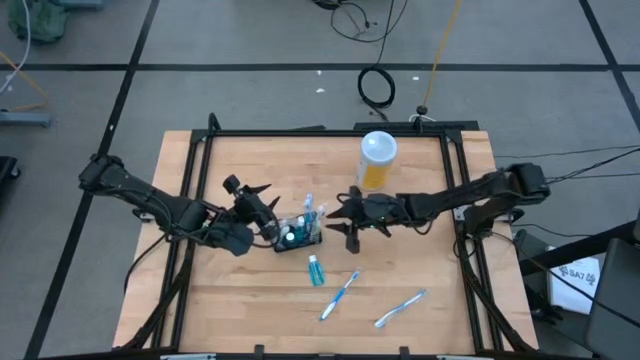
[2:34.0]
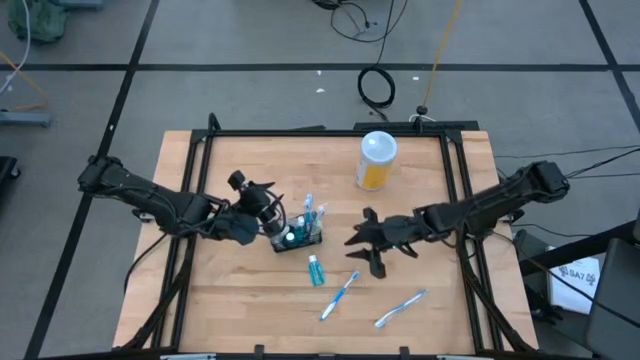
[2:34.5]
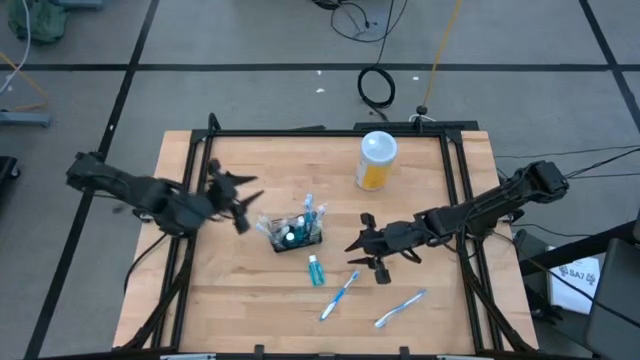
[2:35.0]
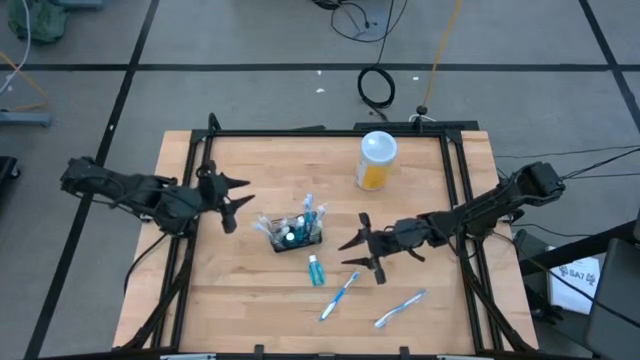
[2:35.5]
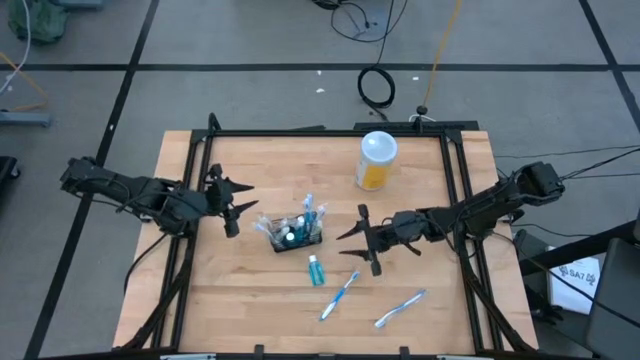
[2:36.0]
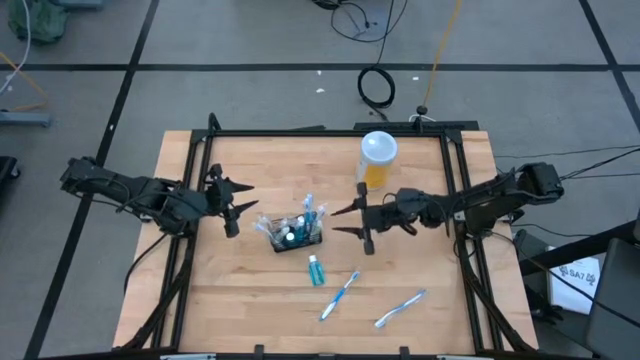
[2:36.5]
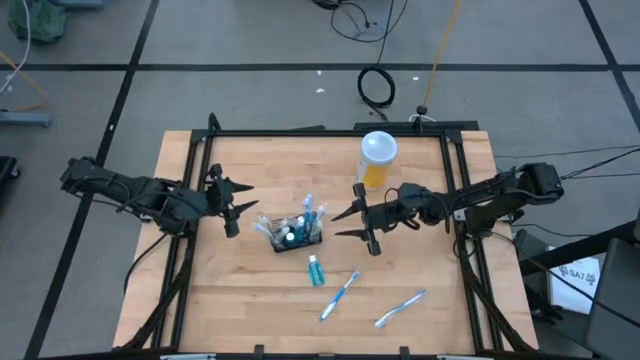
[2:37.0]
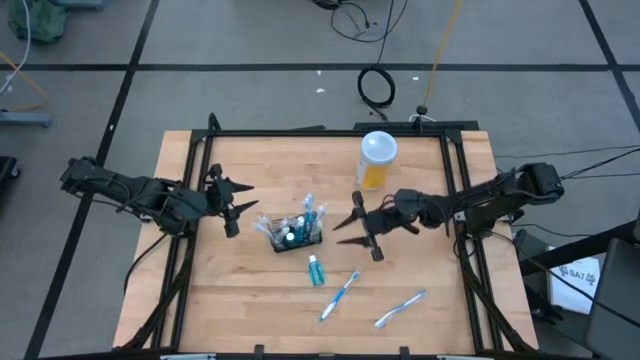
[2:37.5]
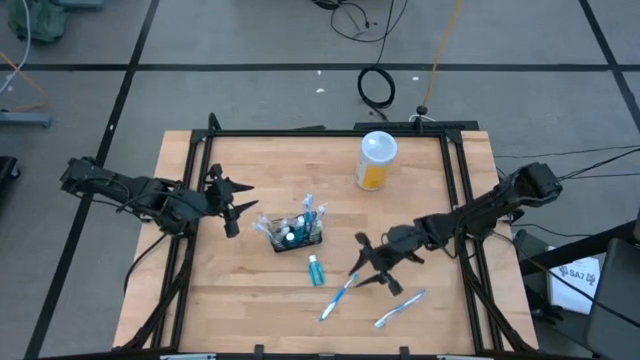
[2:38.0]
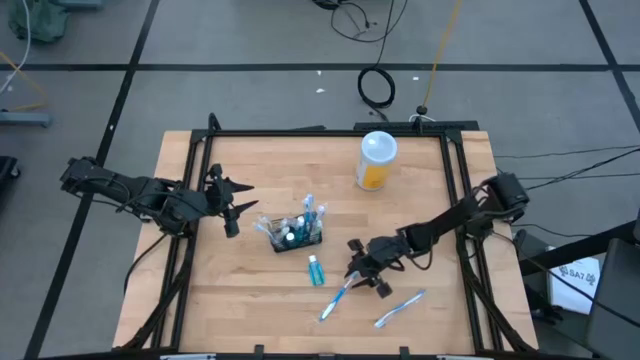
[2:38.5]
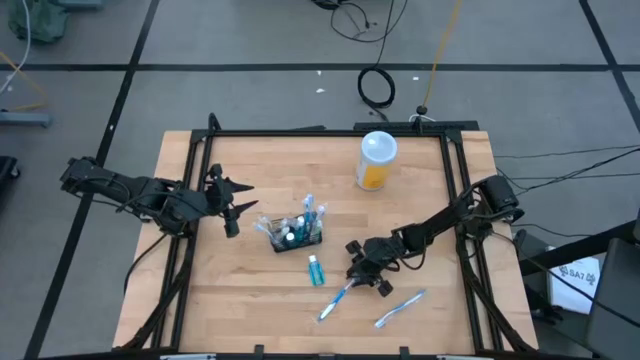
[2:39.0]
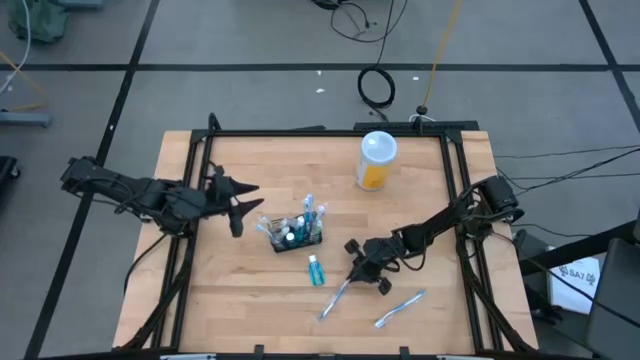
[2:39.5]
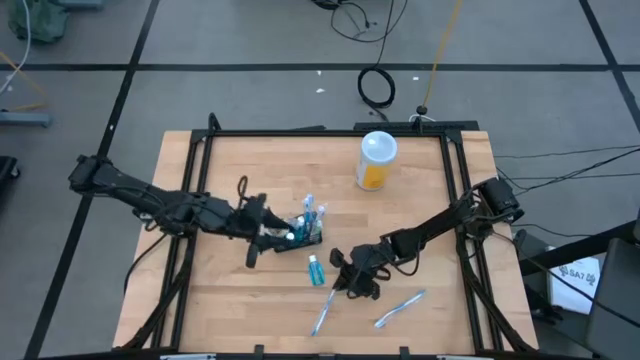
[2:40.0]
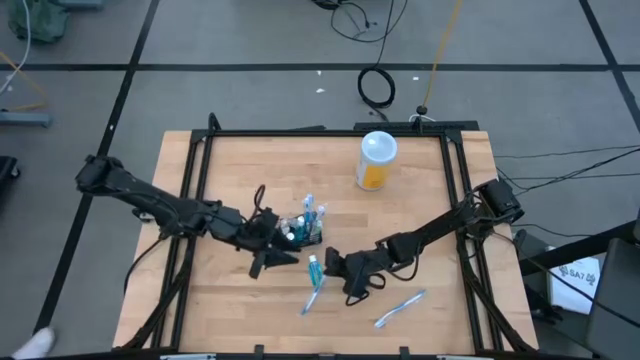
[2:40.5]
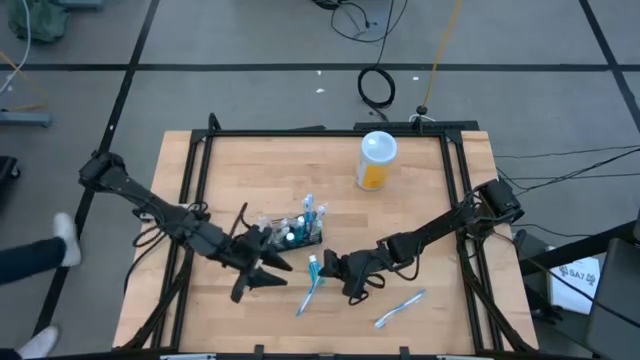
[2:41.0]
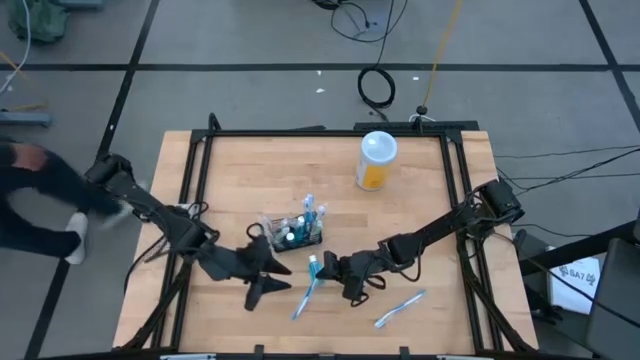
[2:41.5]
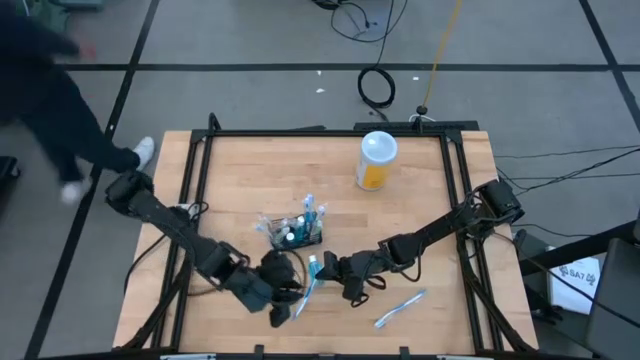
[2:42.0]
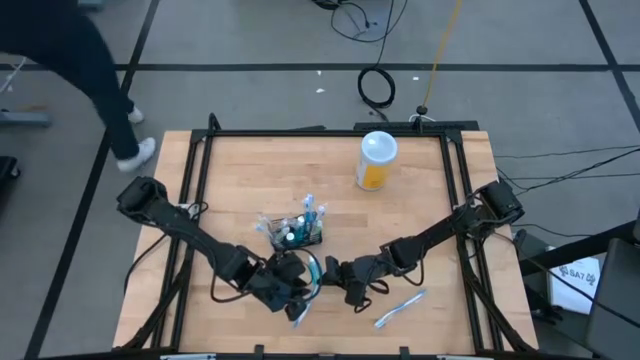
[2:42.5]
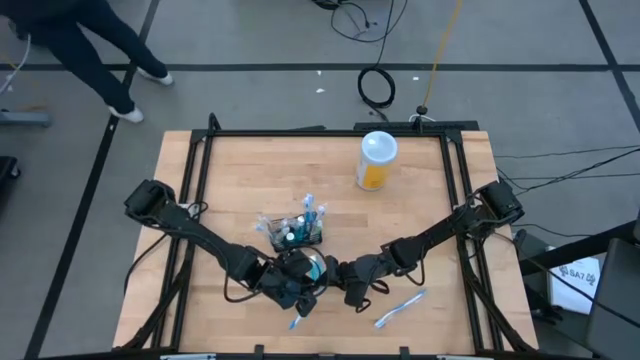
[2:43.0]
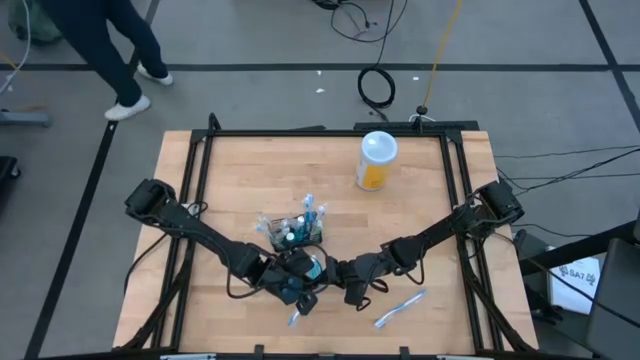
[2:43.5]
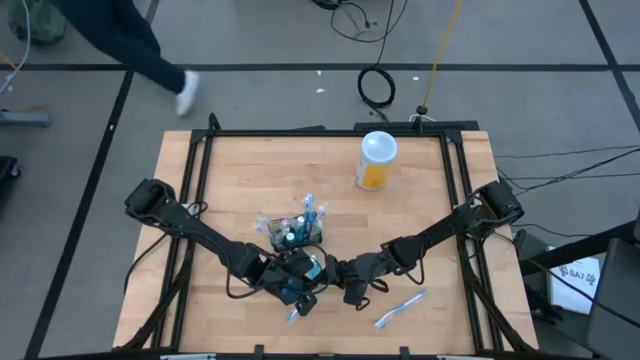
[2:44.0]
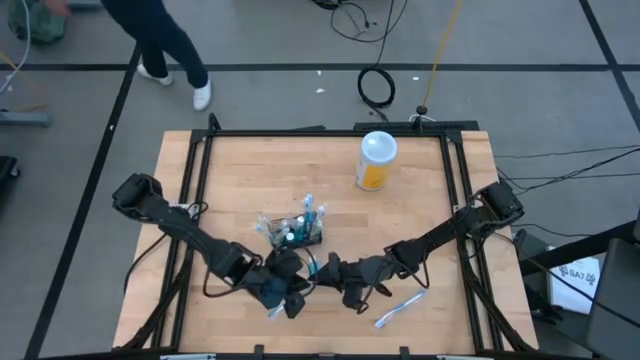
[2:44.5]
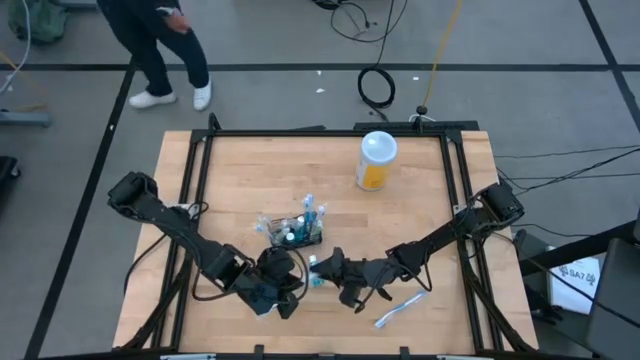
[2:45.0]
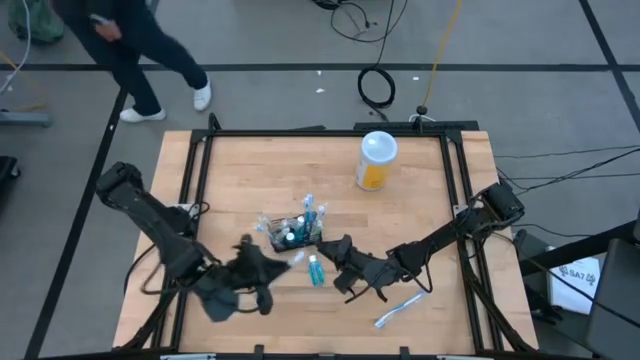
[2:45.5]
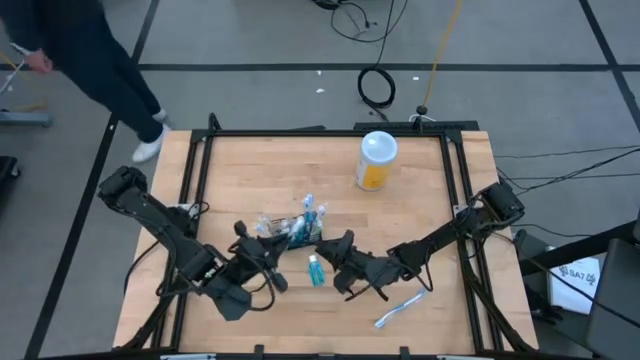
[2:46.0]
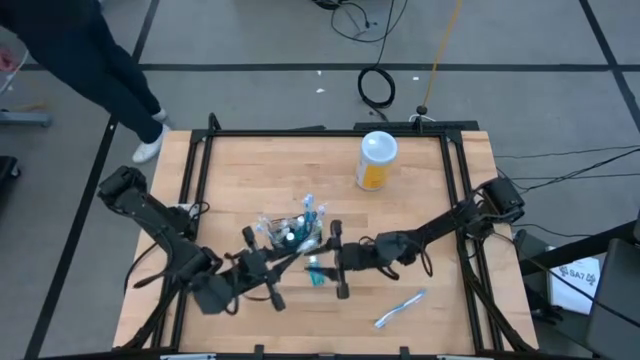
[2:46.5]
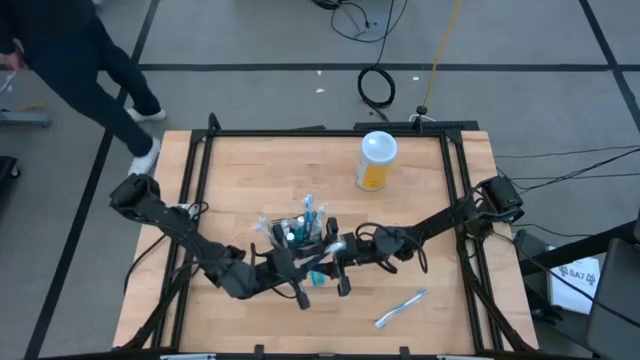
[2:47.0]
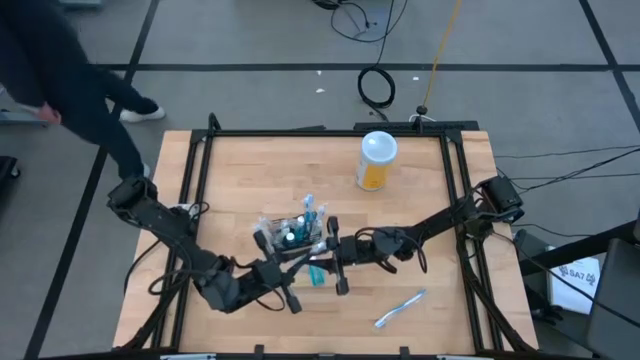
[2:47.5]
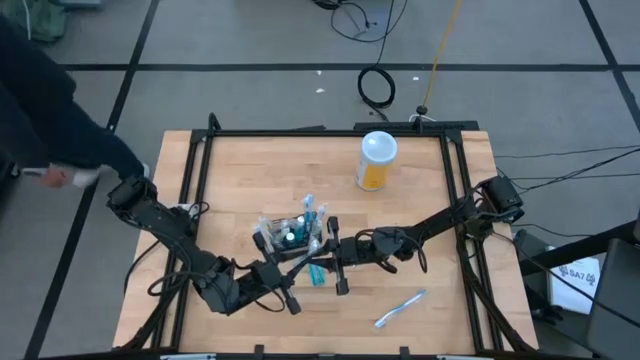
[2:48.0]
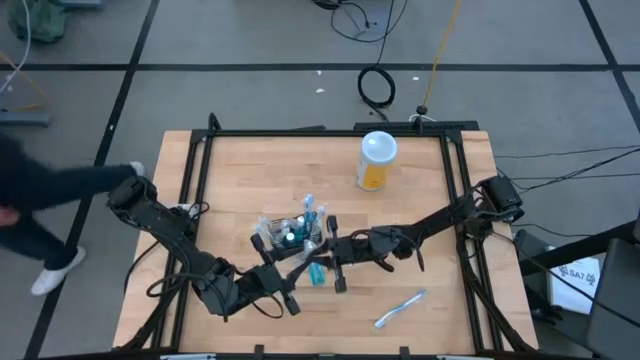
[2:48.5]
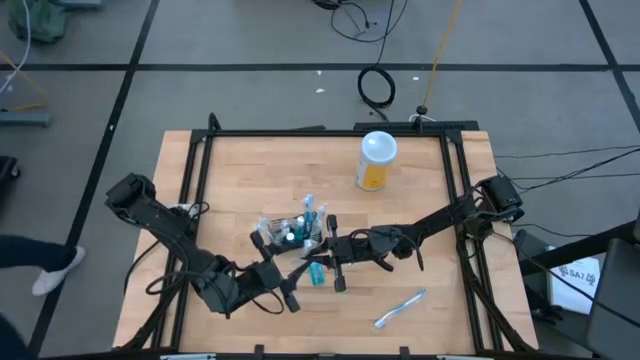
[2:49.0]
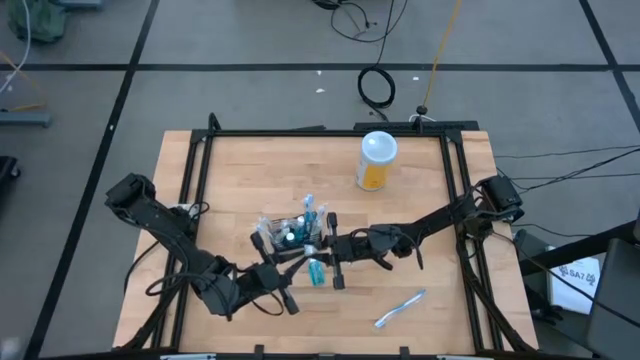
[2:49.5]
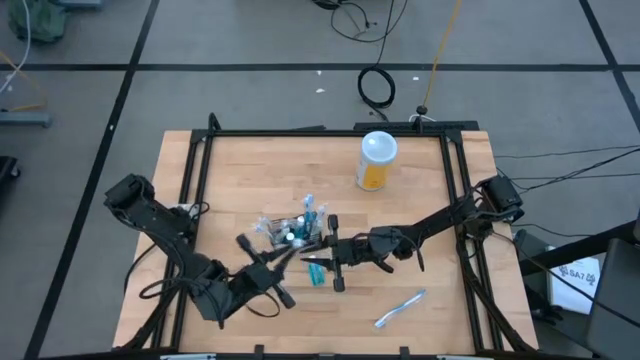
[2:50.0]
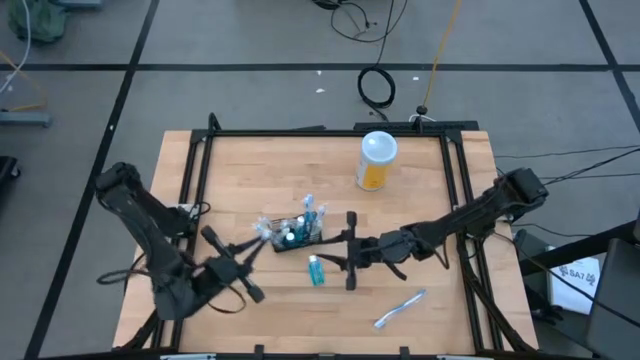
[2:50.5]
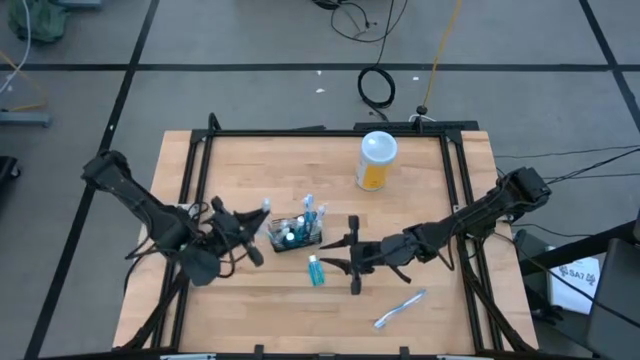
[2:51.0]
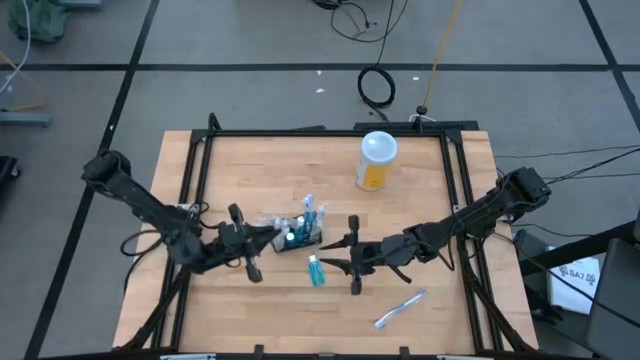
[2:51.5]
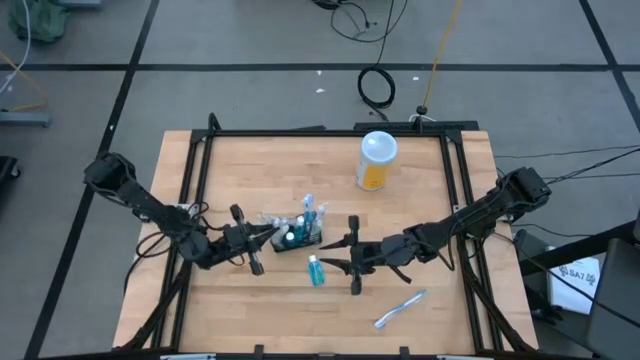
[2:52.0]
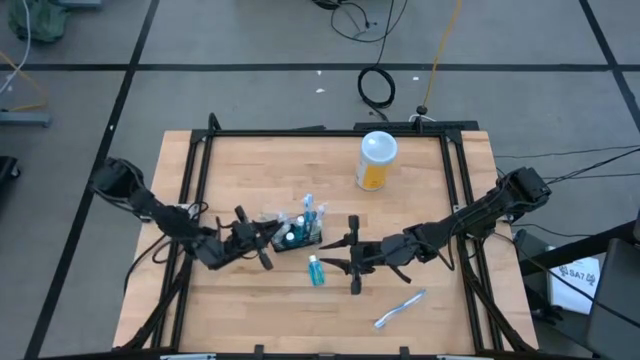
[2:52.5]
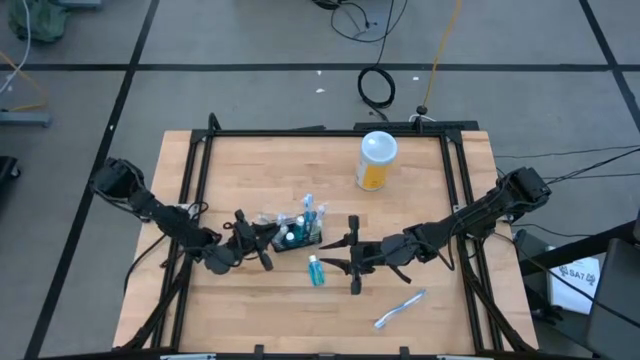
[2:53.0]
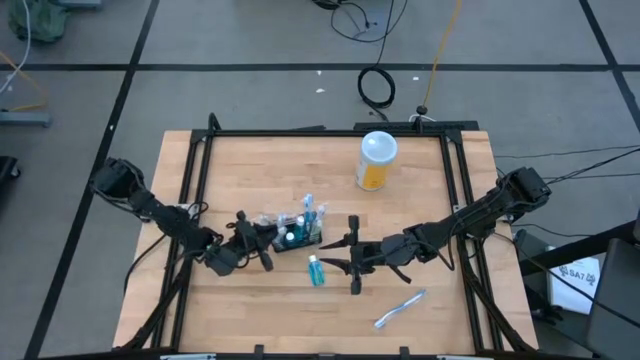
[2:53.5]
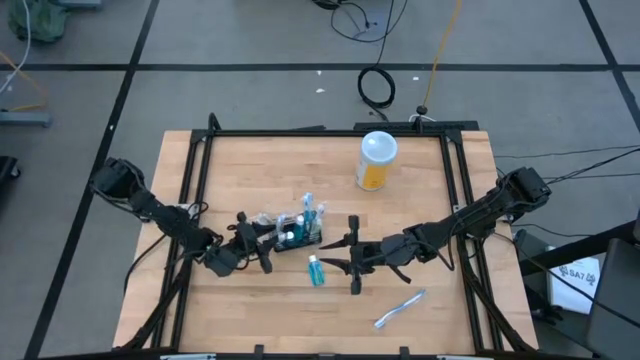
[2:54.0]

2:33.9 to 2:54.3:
Task: Pick & Place toothbrushing station
Put the left blue toothbrush into the black wire organizer

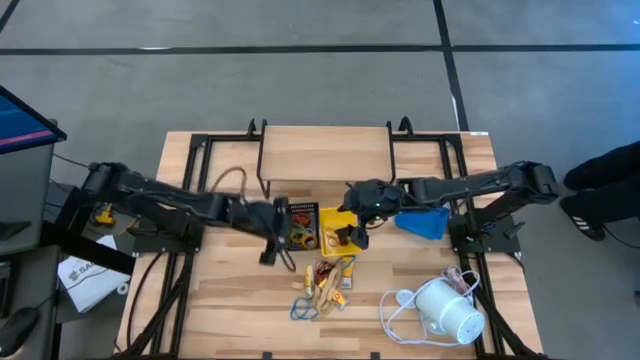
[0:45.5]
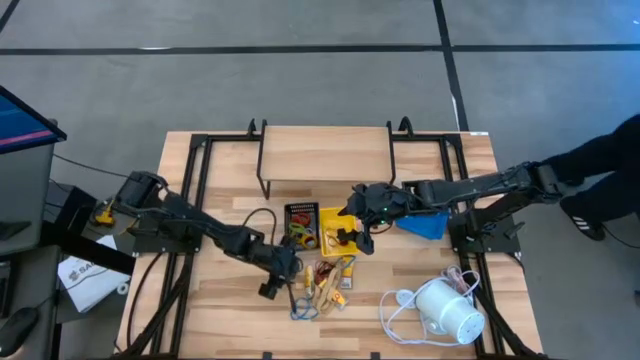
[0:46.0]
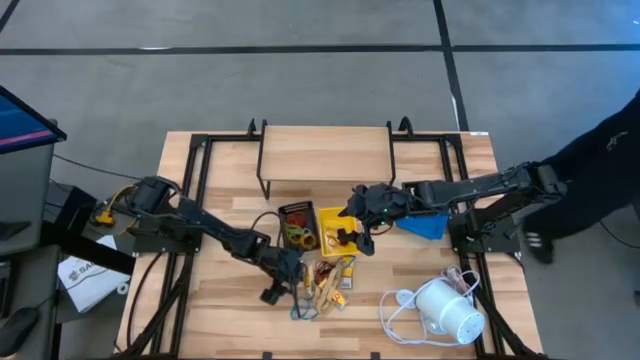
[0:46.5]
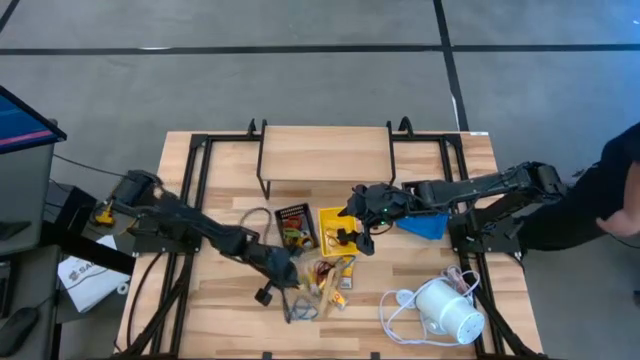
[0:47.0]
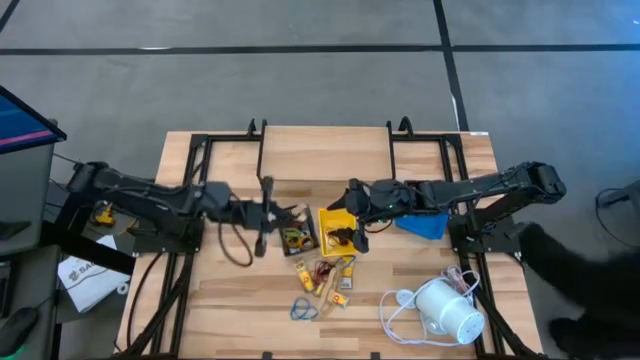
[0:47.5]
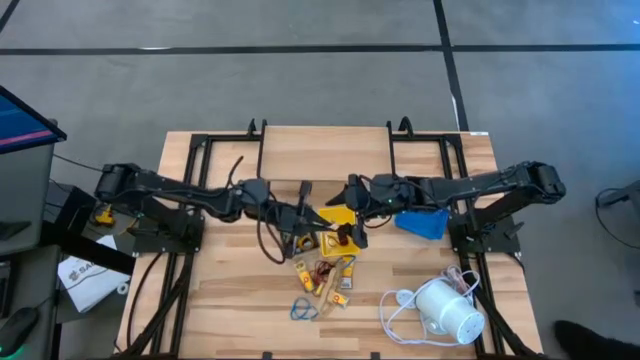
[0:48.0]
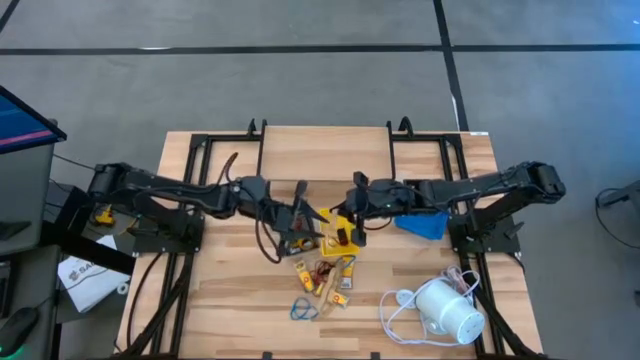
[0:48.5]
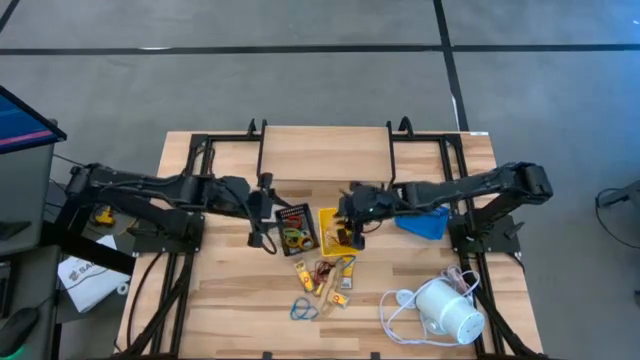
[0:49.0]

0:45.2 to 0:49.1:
Task: Pick & Place Office Desk Supplies
Put the light brown rubber band into the yellow bin
